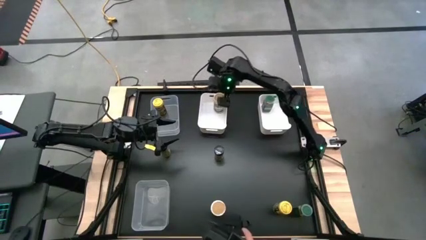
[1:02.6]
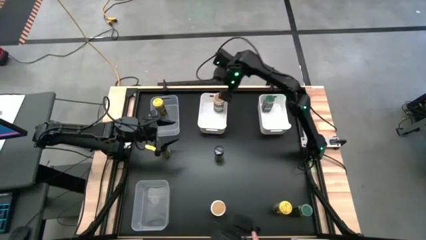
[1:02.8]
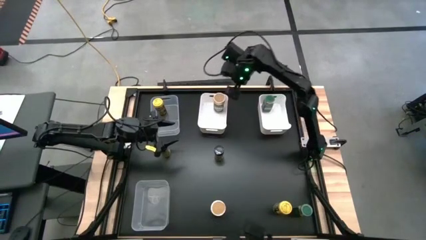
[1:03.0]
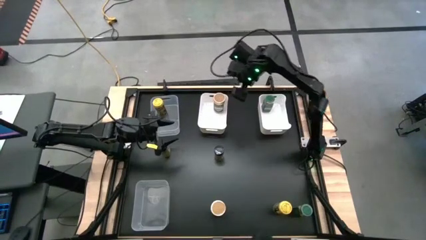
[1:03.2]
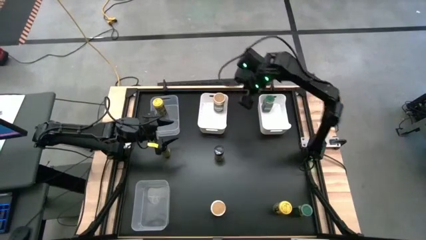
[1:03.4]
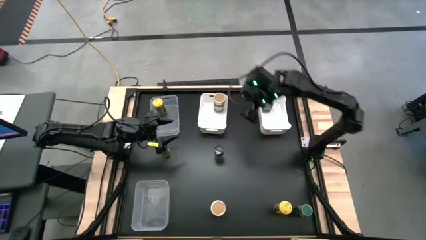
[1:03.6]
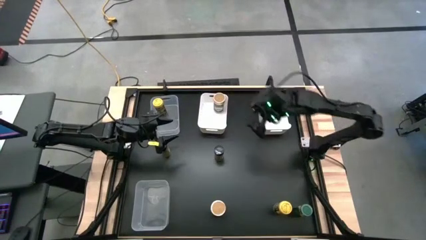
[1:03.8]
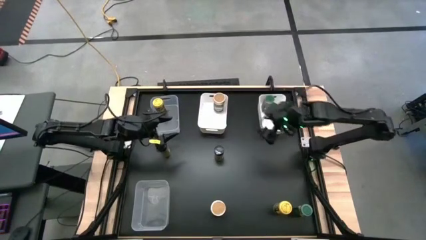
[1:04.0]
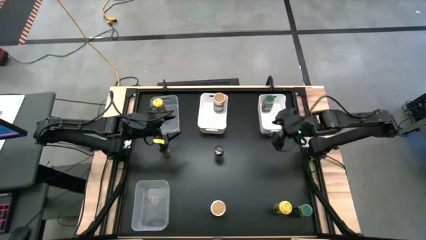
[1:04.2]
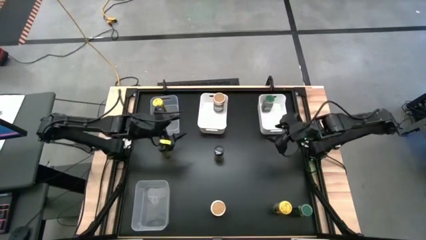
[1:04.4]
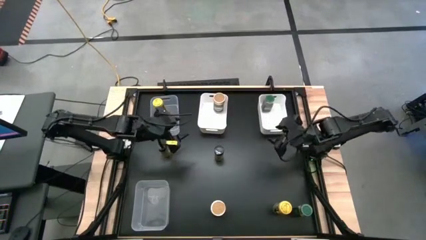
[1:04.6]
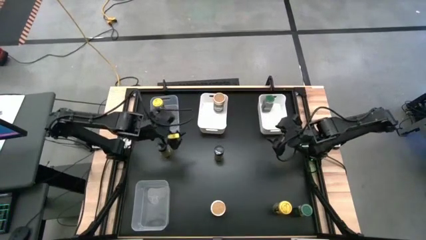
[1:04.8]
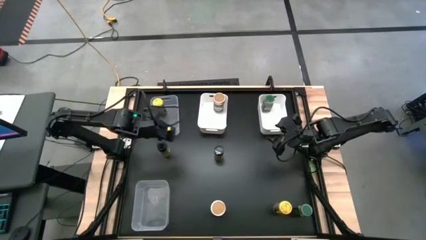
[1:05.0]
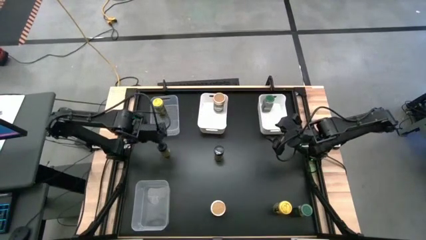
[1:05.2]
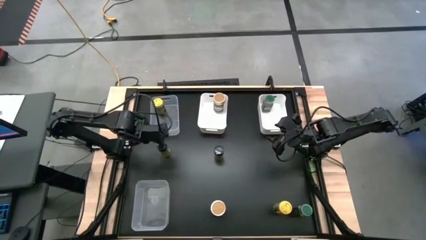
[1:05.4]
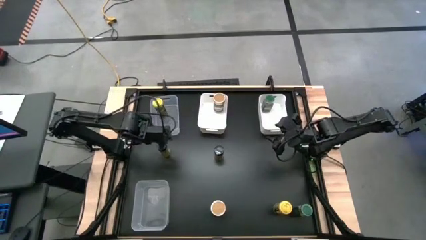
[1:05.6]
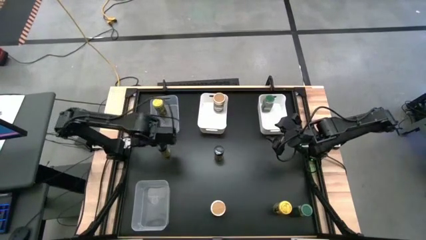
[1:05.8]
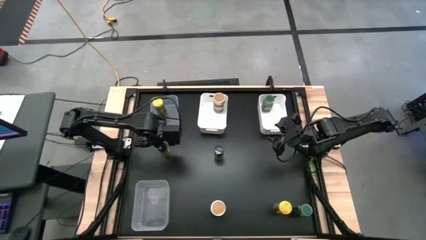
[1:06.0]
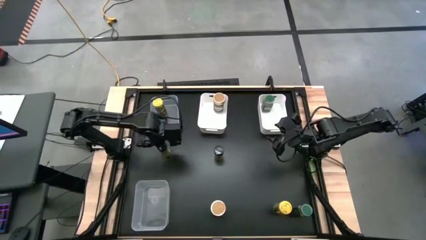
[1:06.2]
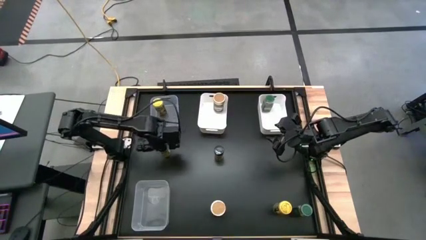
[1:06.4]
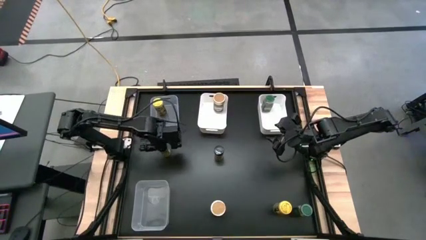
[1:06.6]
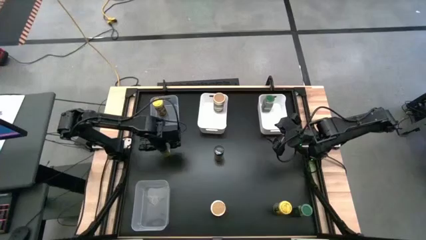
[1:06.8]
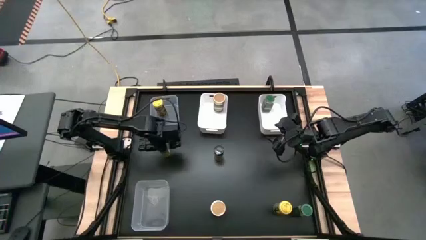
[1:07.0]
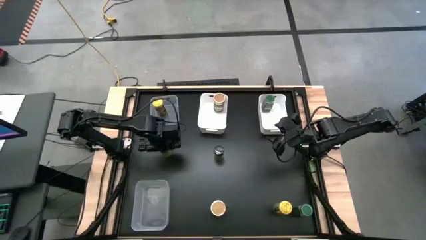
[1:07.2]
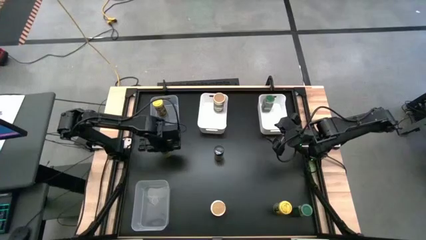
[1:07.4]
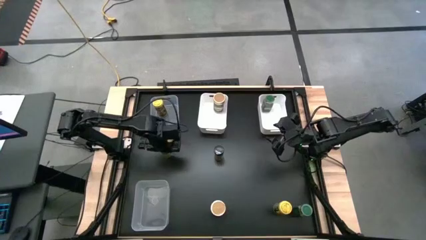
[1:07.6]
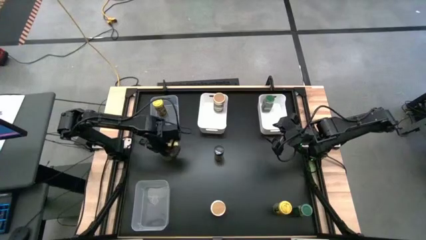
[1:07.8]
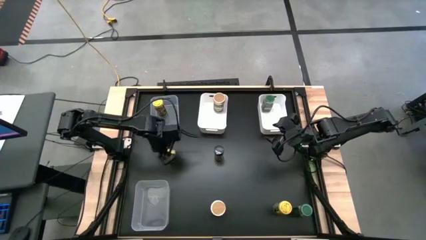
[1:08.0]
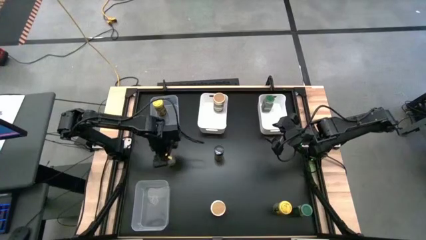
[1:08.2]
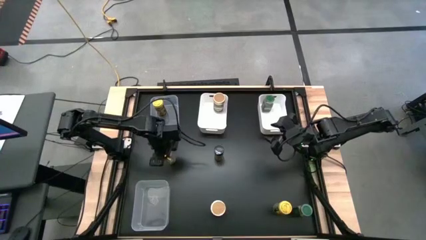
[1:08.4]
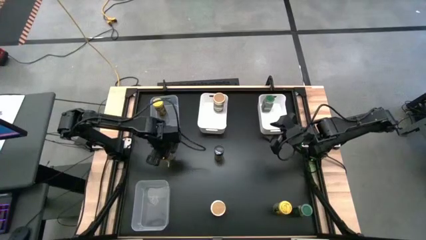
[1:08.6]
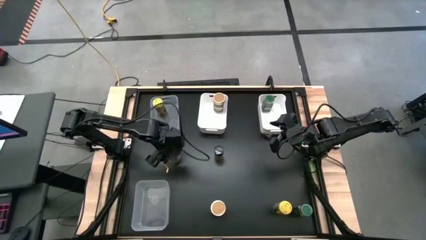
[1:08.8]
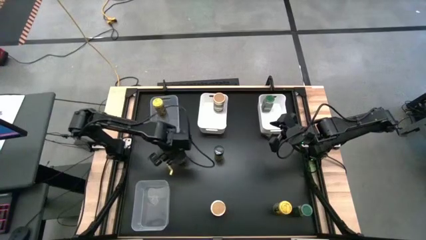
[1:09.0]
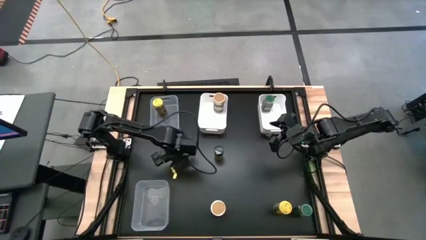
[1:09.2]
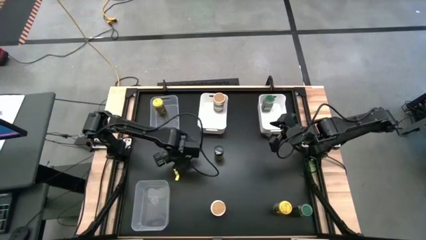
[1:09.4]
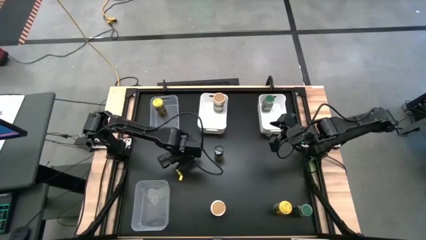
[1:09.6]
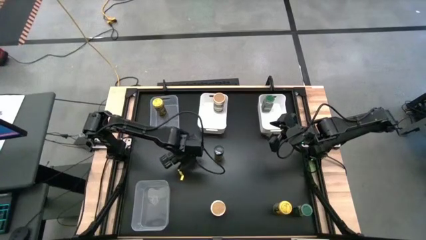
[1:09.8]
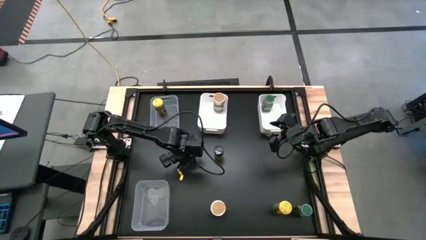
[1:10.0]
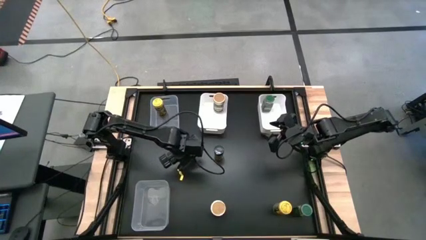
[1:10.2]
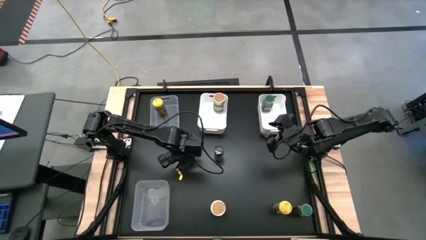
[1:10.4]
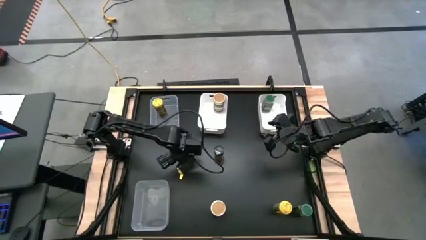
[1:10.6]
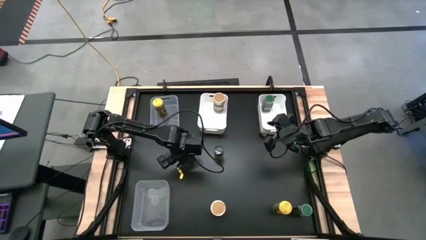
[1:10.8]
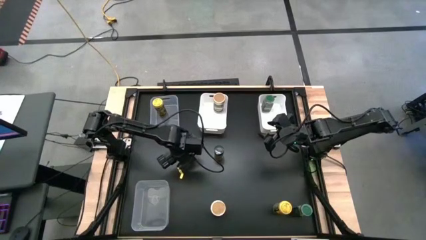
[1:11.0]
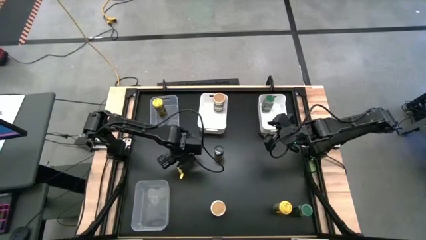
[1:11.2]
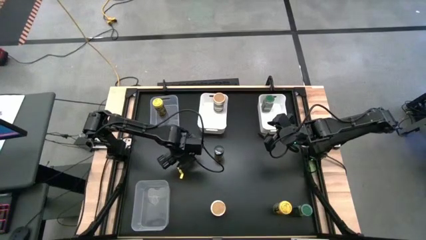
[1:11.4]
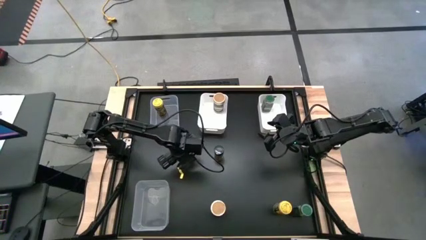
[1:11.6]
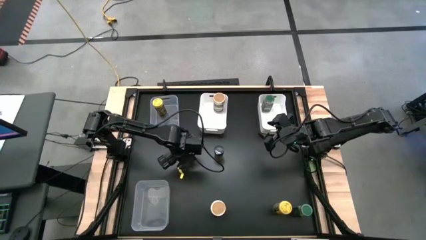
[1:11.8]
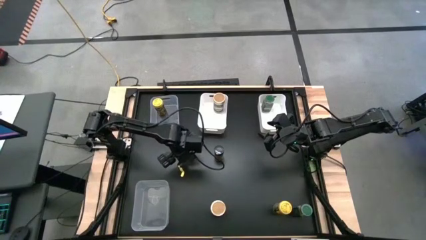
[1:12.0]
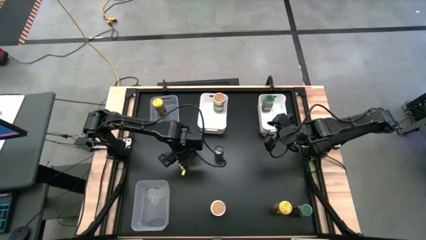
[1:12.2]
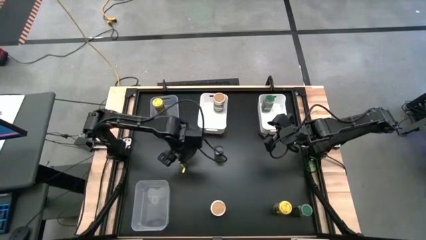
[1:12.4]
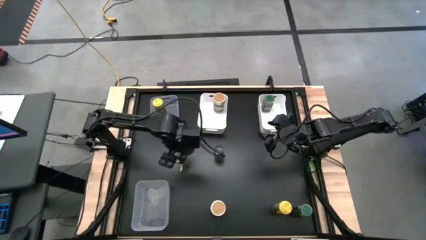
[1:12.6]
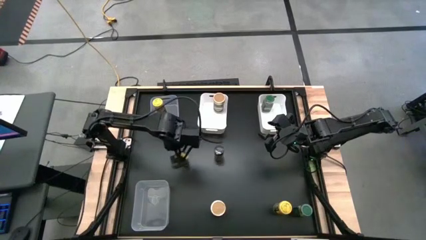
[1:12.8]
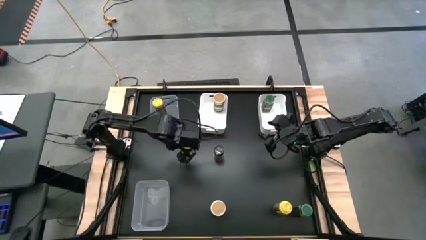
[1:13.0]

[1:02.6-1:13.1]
Task: Sort spices by type
Put the left black spice bottle into the bottom transparent bin
